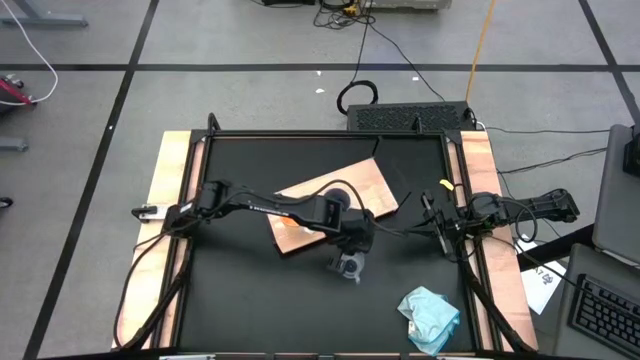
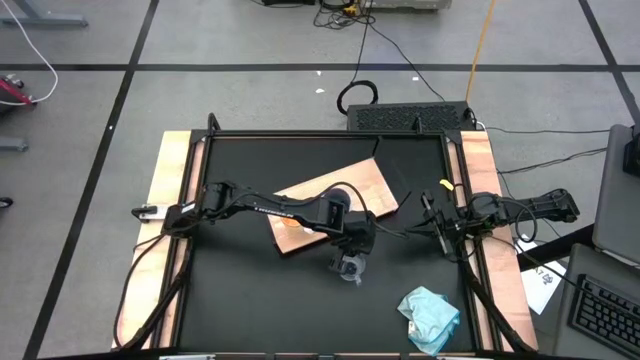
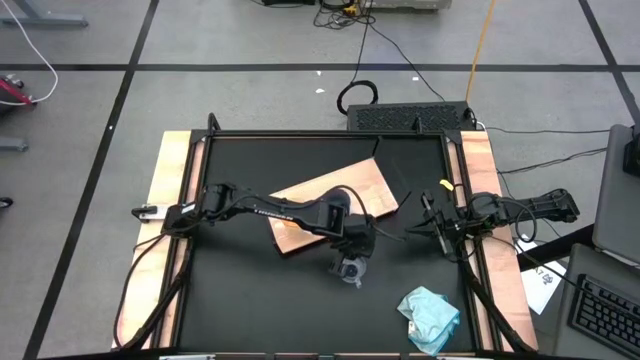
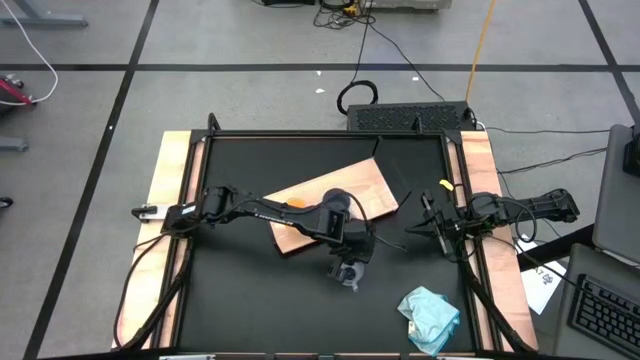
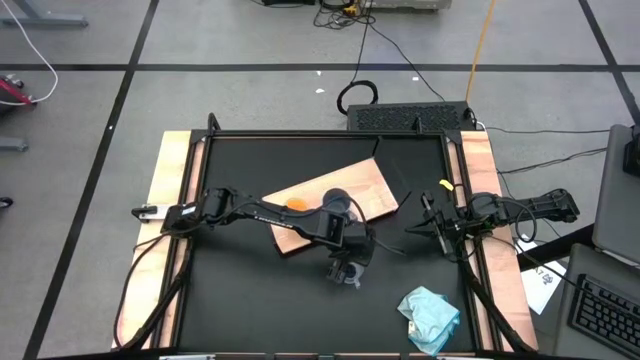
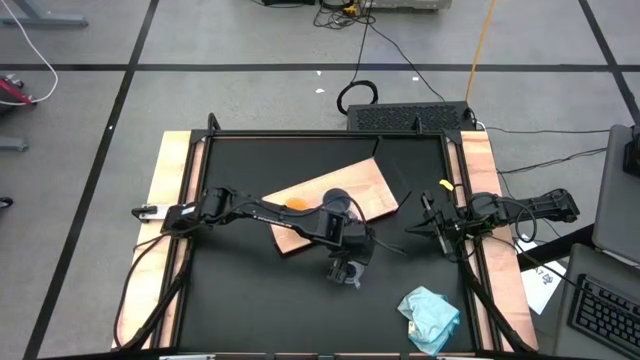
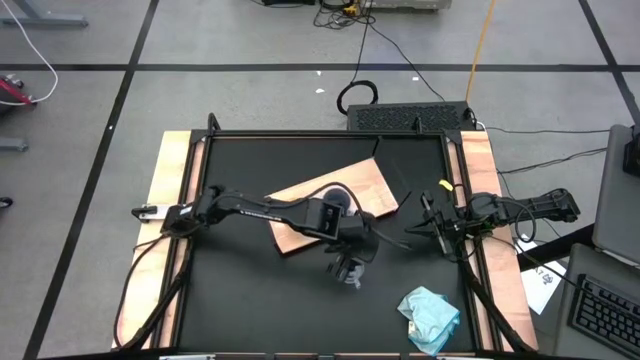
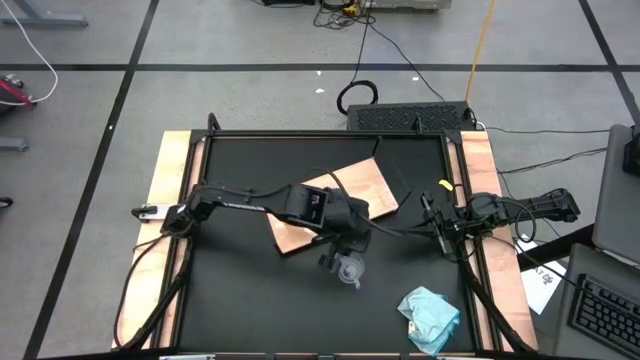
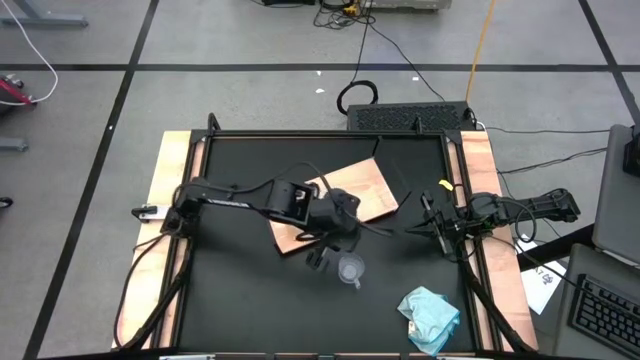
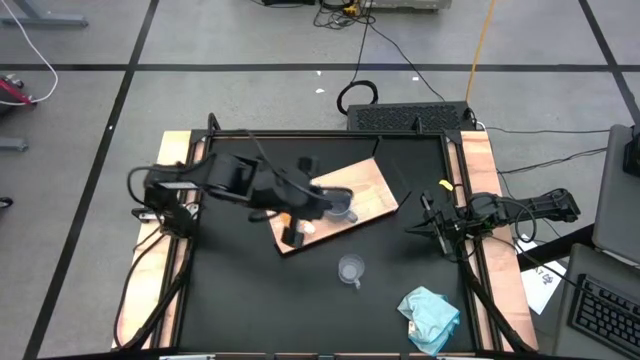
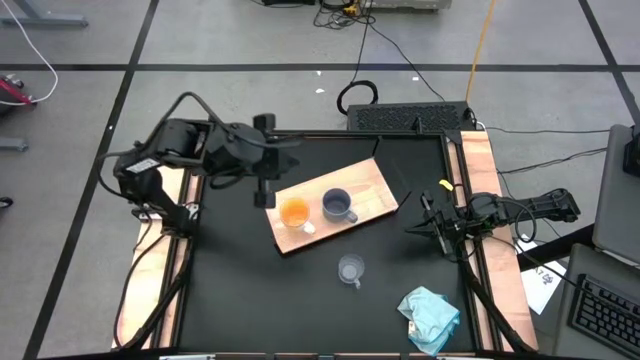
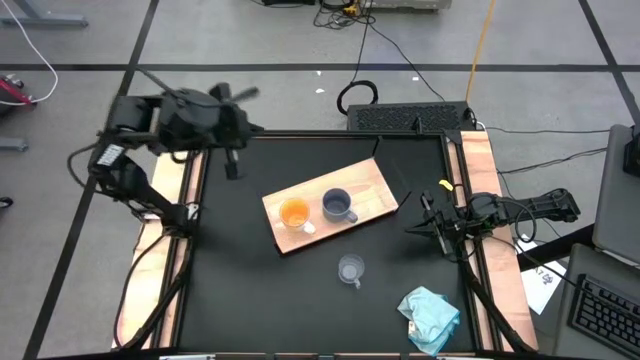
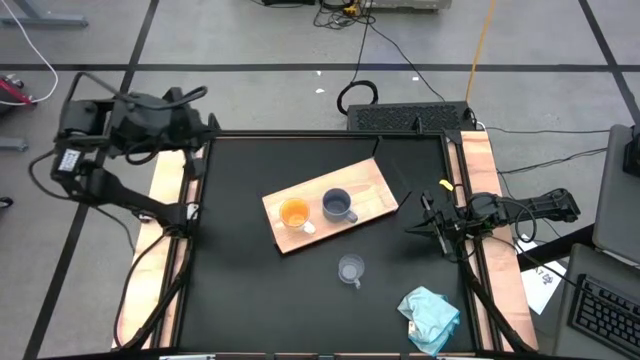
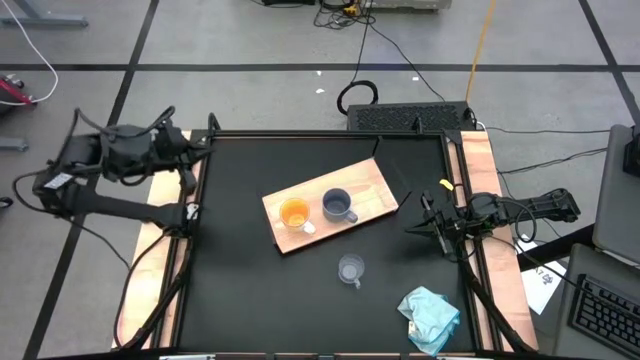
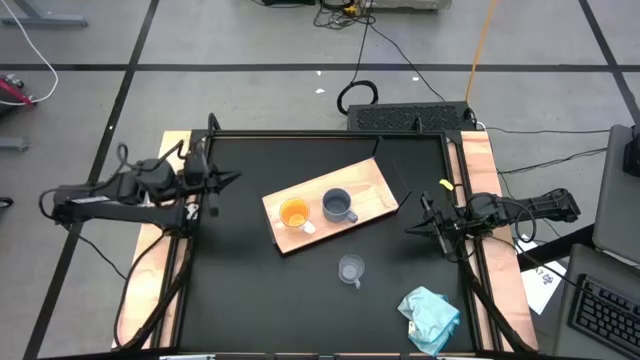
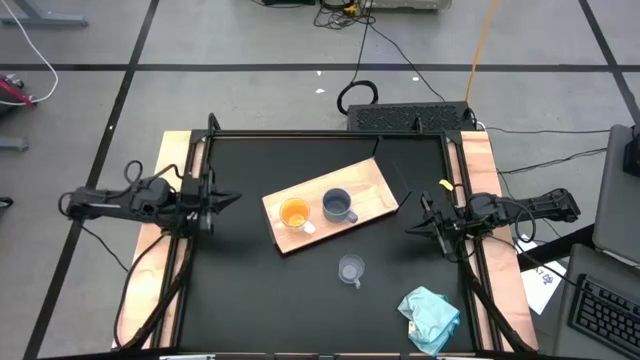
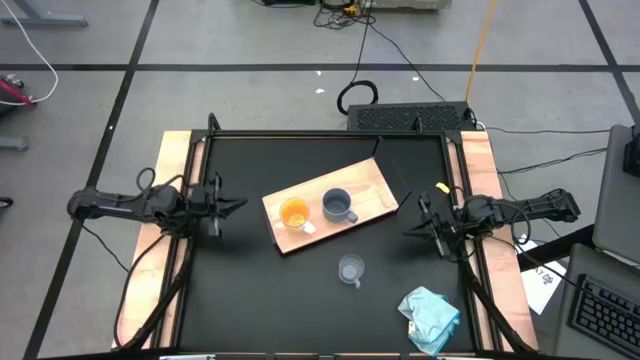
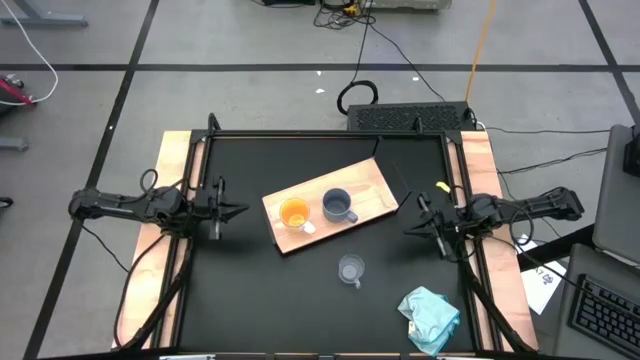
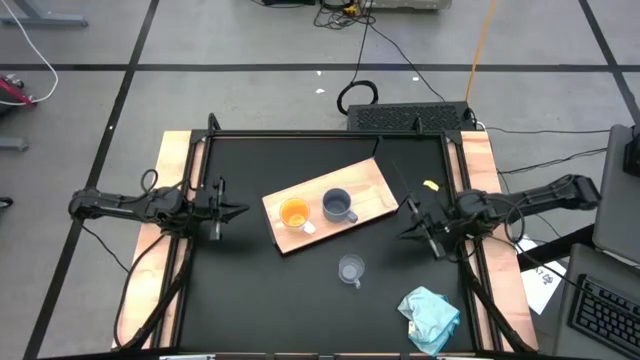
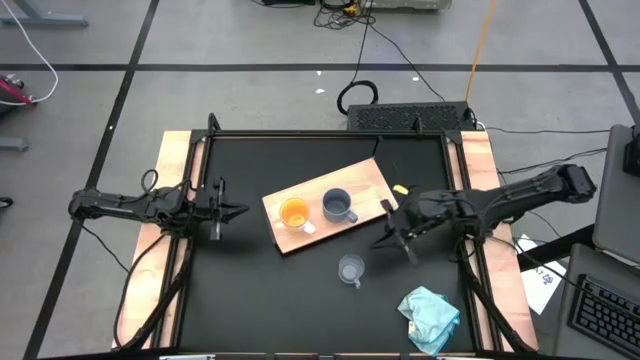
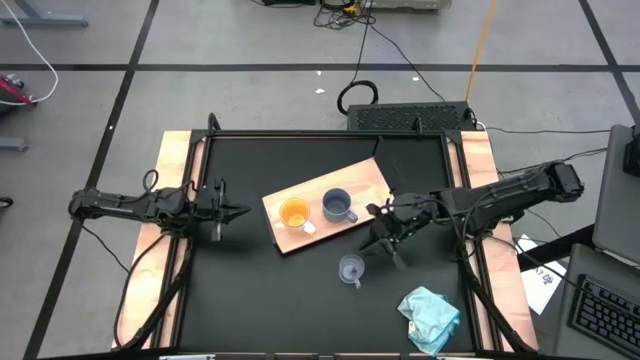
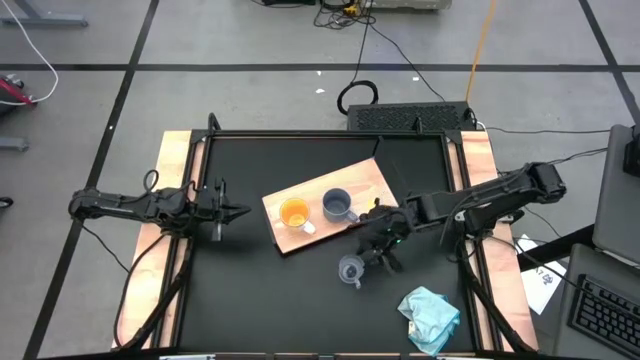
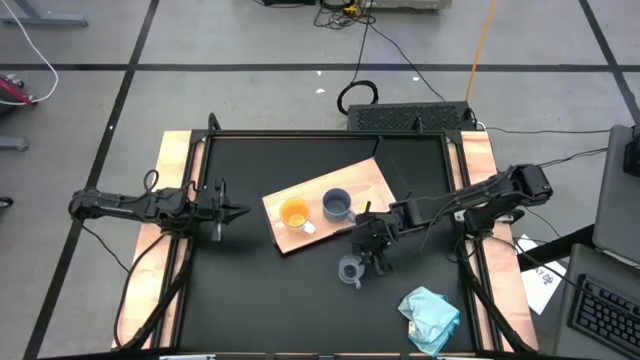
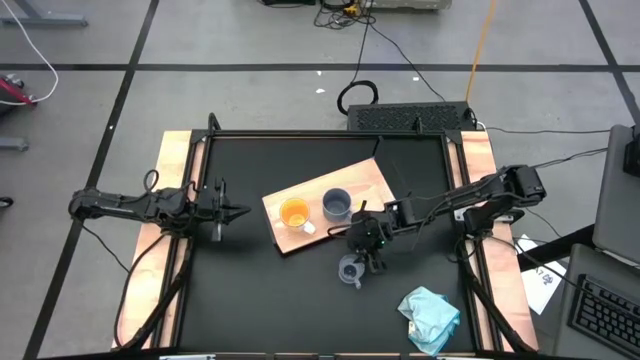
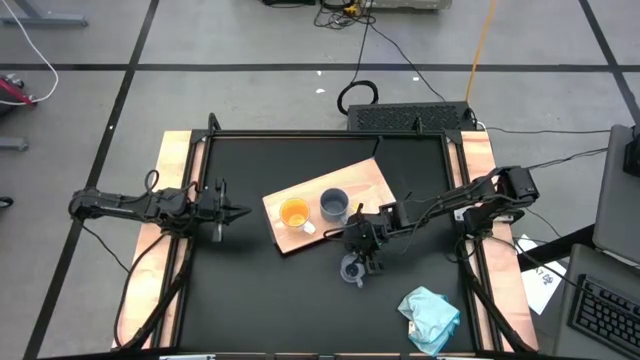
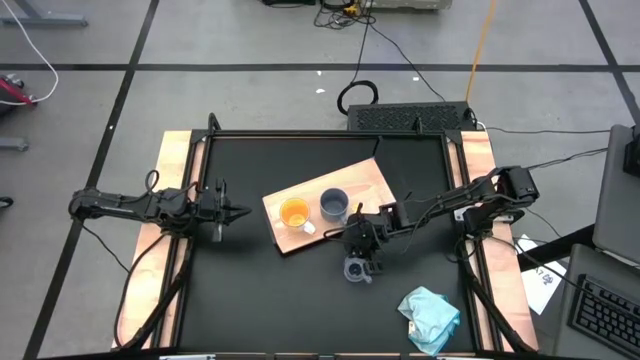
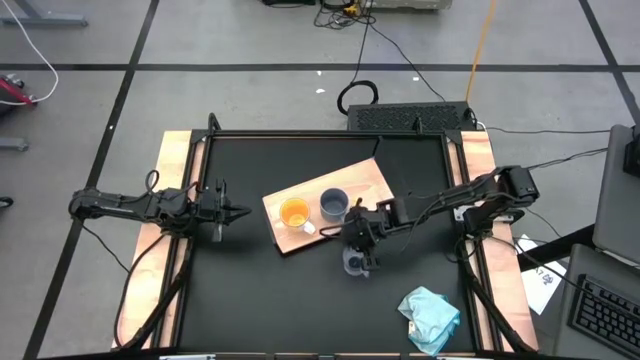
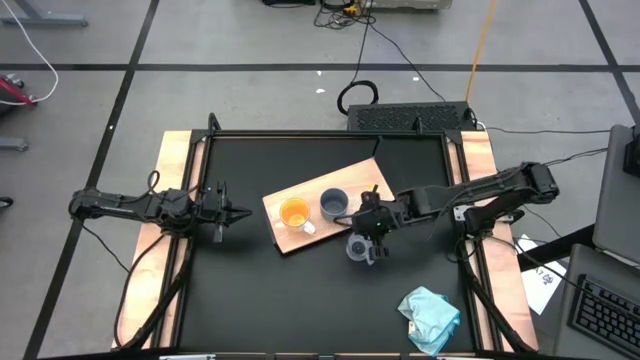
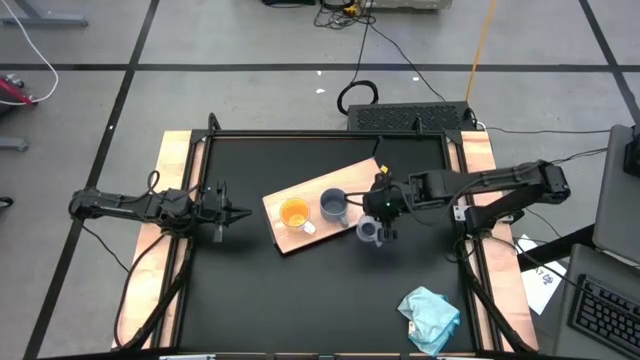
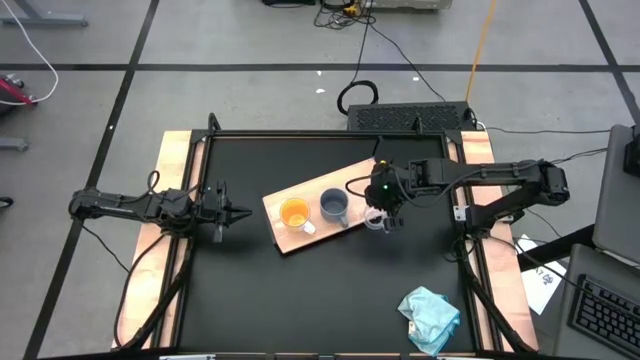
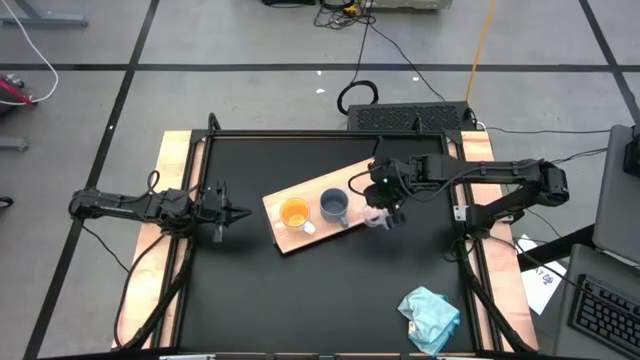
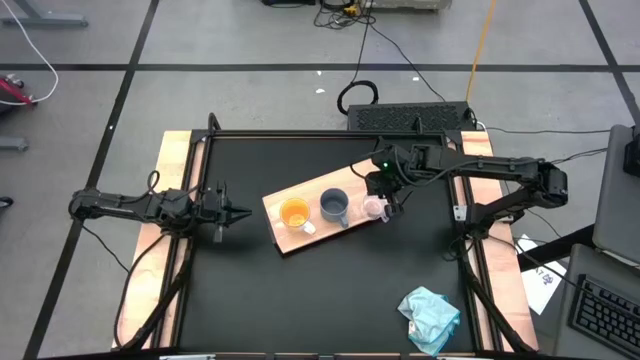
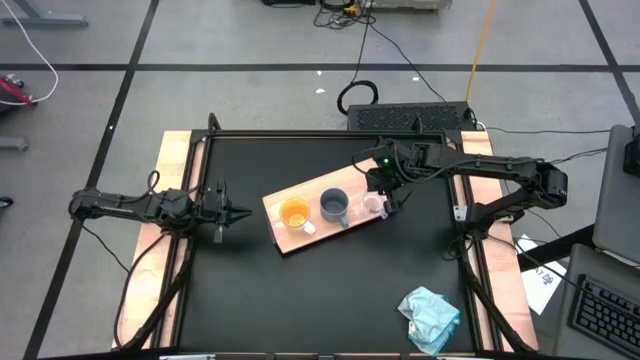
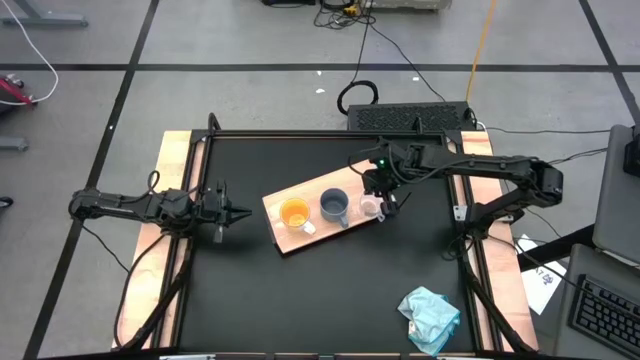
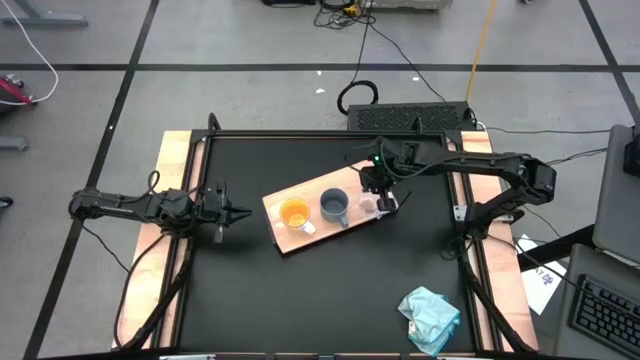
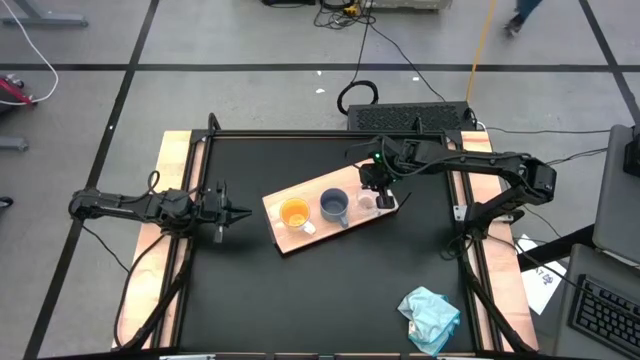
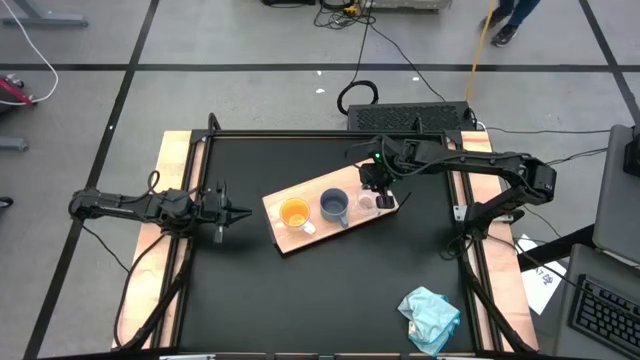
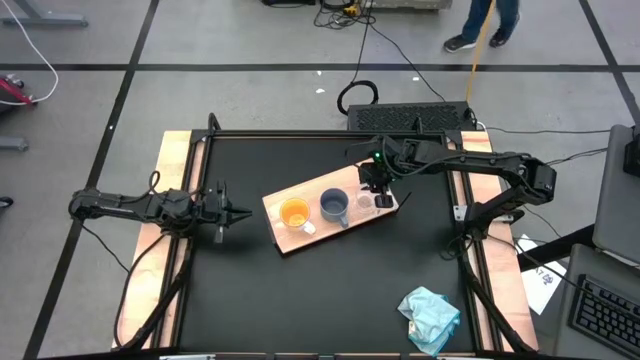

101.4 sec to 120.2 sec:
Task: Stack small to large cups/mugs on shelf
Put the transparent mug on the shelf
